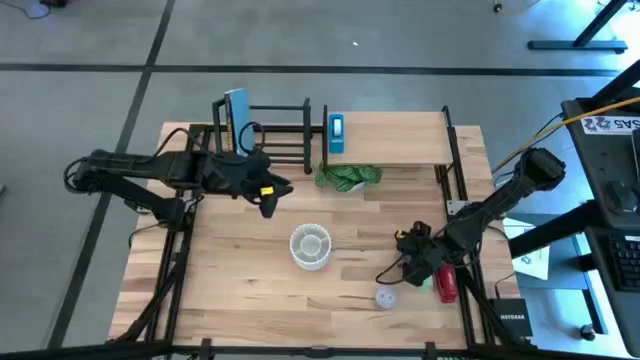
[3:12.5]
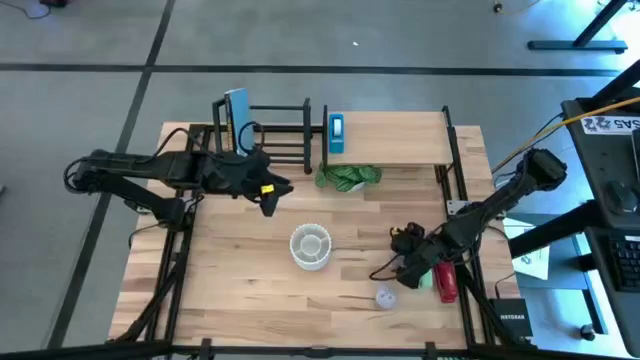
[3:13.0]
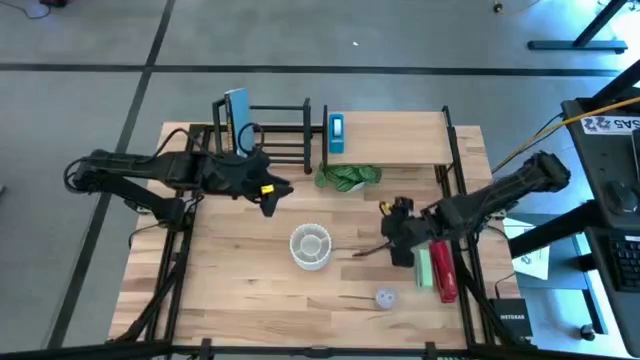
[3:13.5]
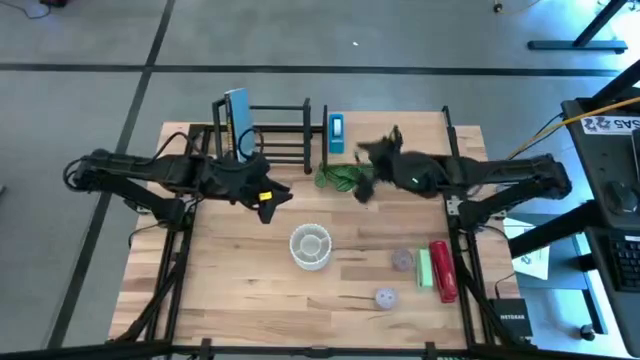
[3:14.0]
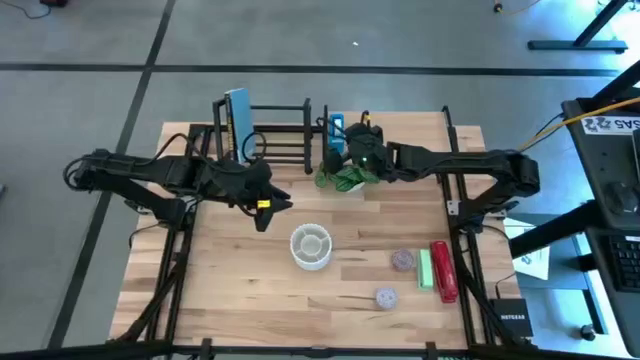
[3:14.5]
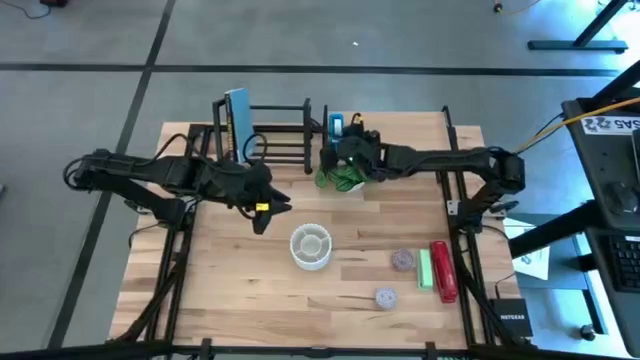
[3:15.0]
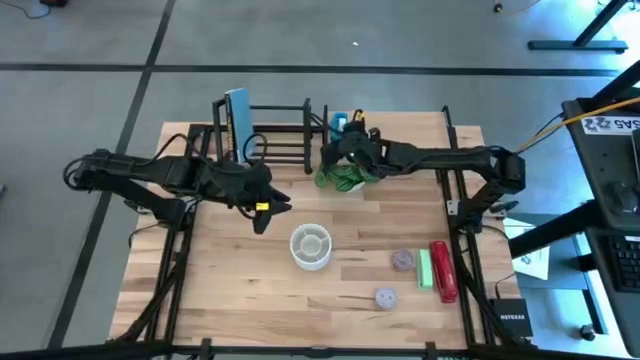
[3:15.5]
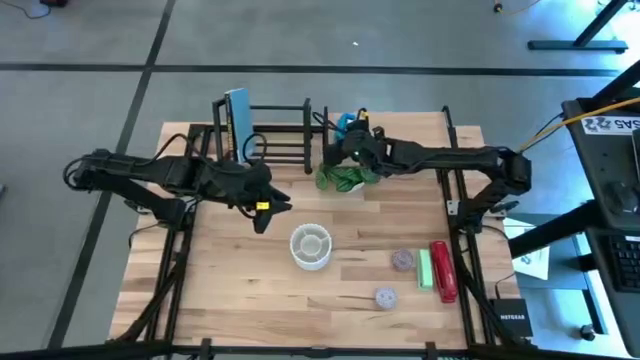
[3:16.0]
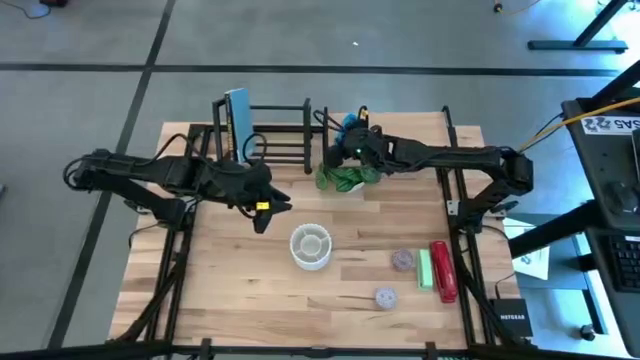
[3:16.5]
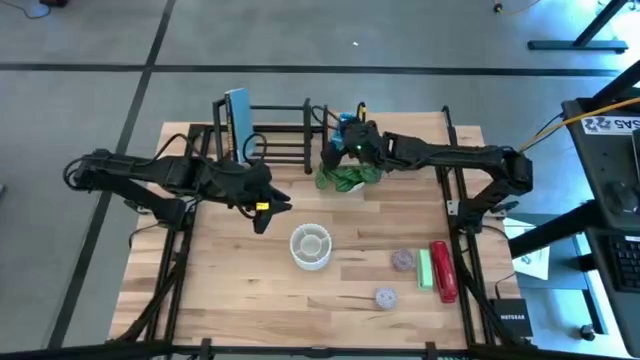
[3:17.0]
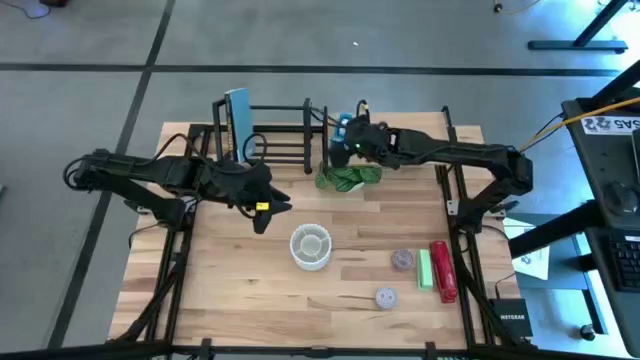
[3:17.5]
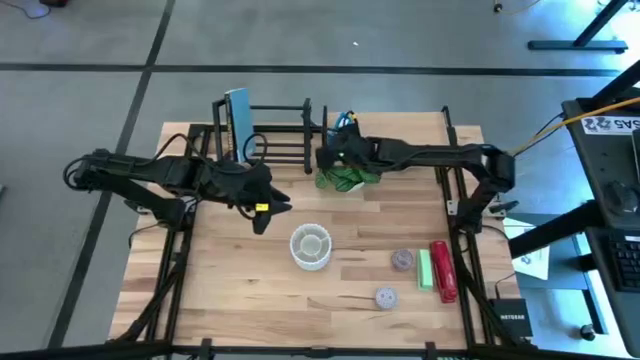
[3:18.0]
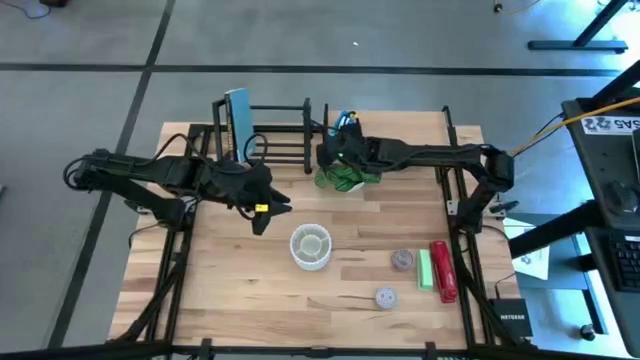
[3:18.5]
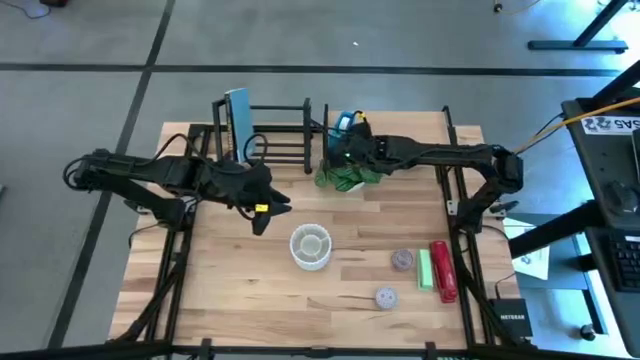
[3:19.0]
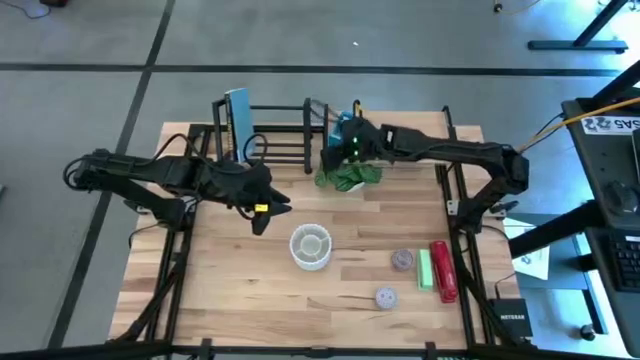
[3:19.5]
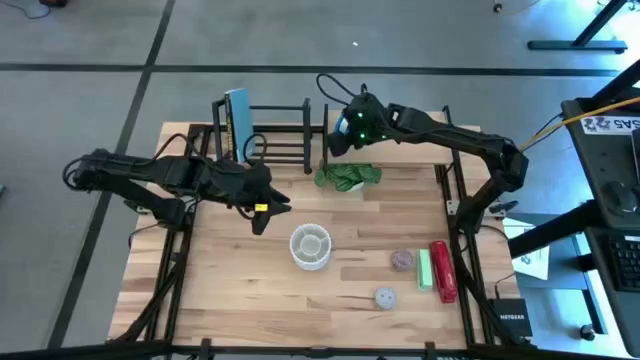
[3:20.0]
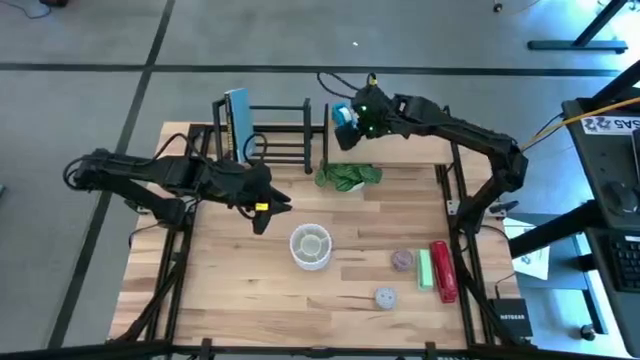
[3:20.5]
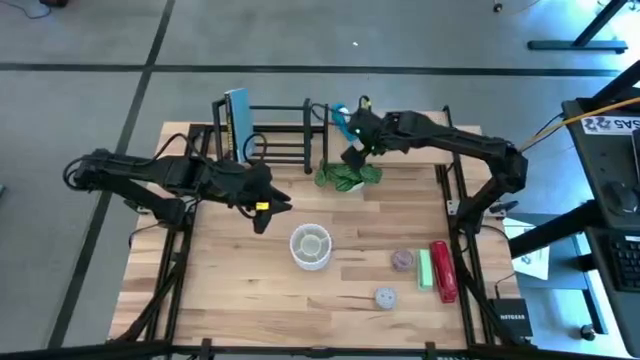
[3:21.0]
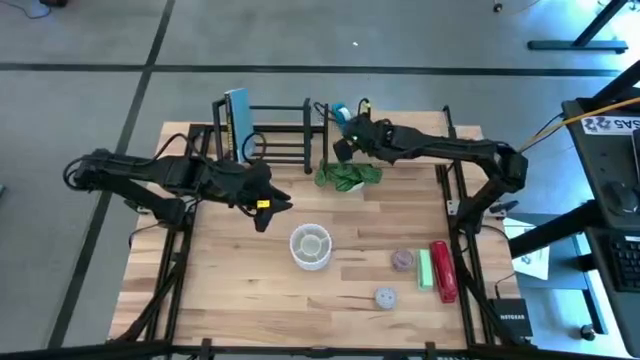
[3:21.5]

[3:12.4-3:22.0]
Task: Stock shelves
Remove the tape dispenser from the shelf

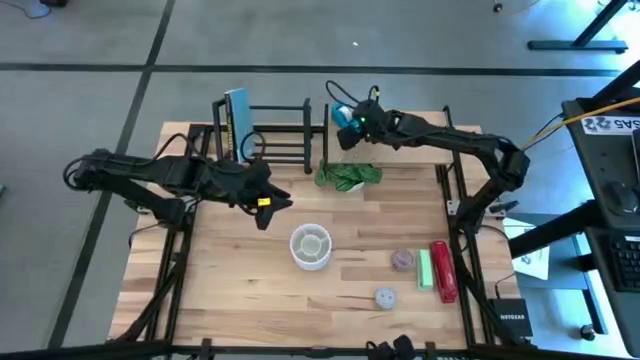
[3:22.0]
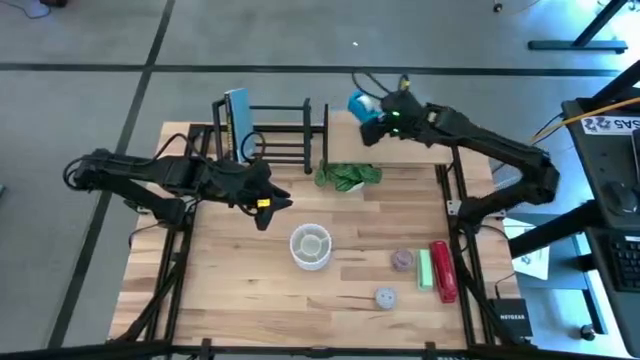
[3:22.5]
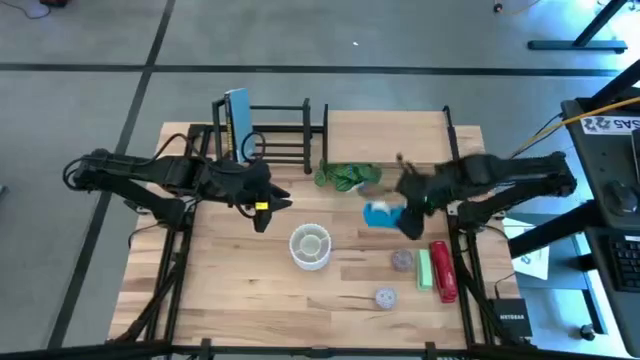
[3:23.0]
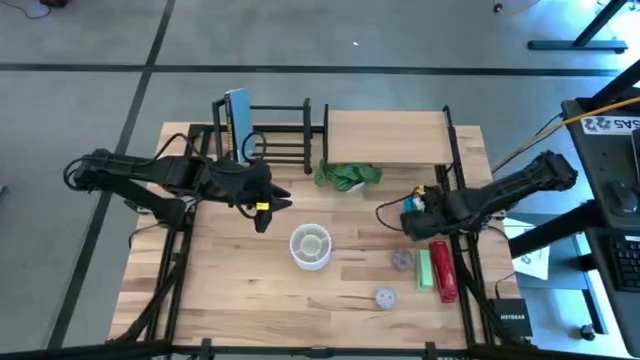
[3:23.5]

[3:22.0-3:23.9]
Remove the tape dispenser from the shelf

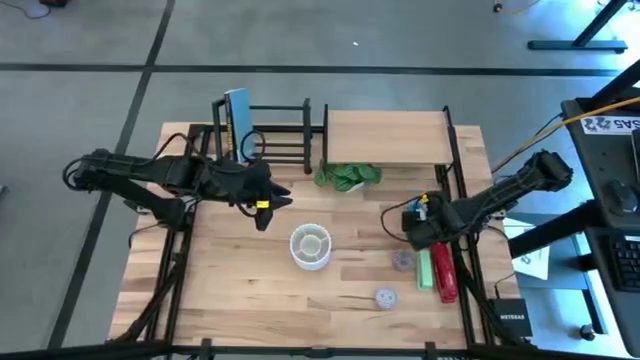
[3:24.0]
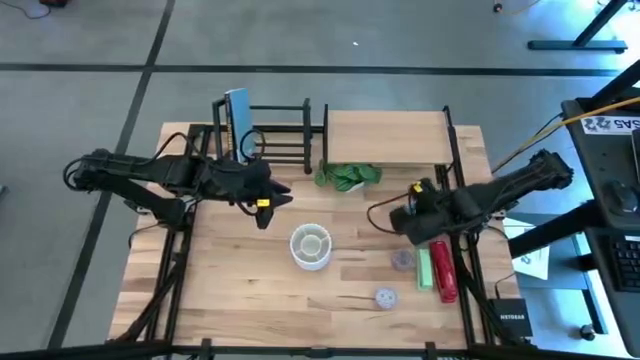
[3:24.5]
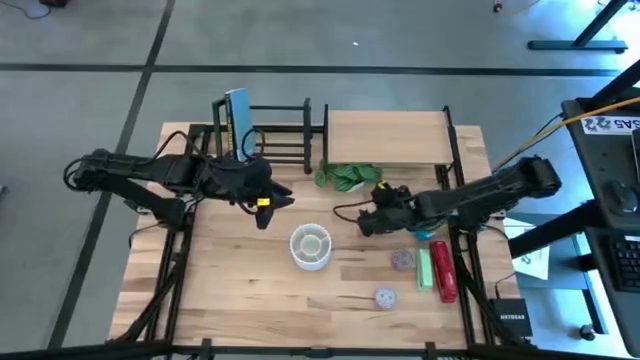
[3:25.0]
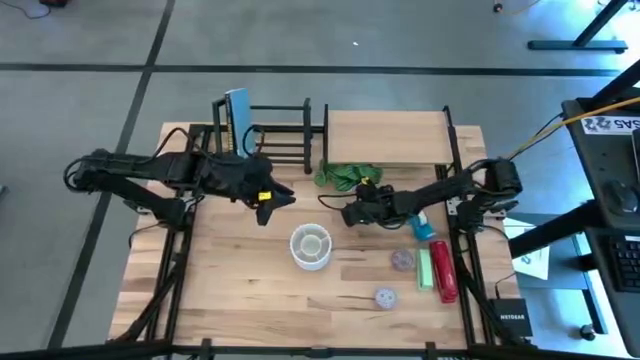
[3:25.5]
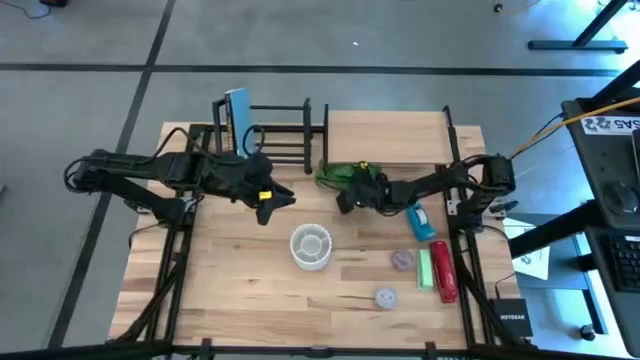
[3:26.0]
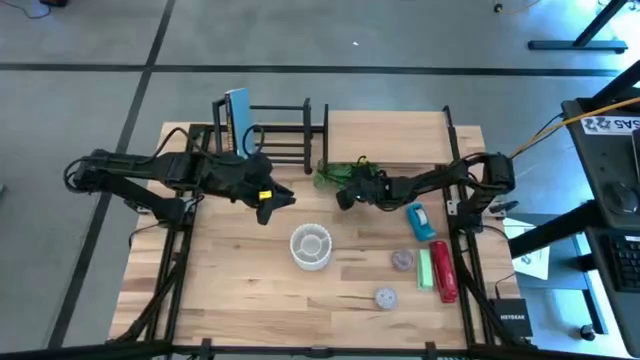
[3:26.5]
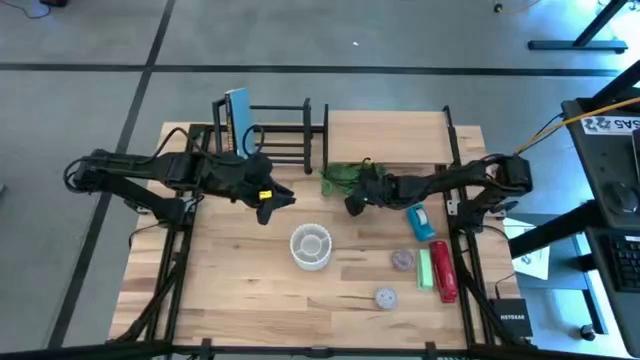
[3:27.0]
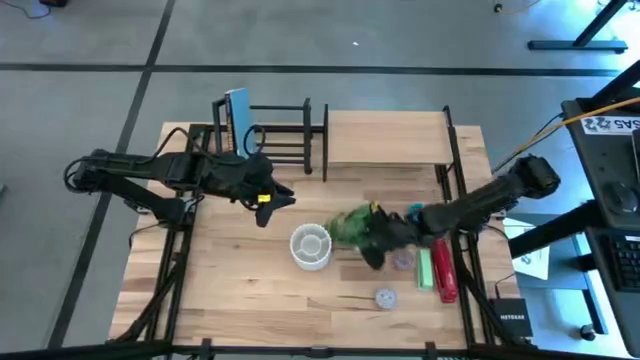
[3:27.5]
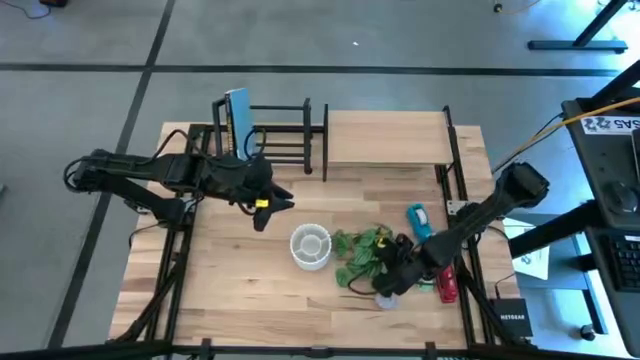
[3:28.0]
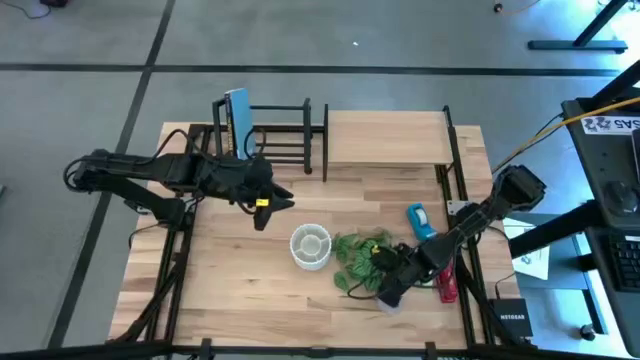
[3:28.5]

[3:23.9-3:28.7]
Remove the white pot from under the shelf

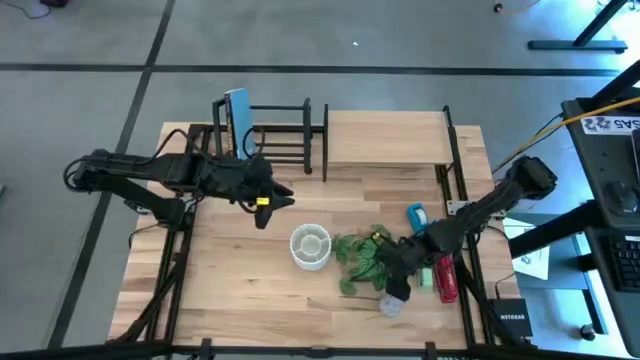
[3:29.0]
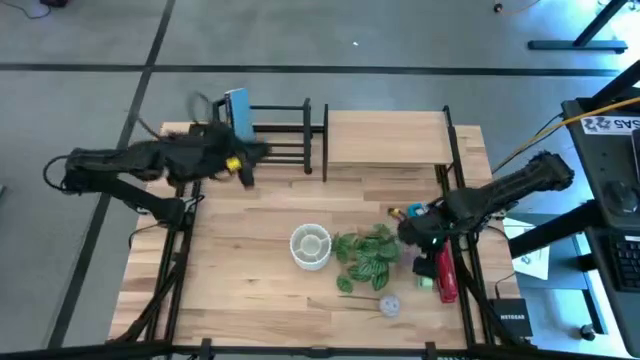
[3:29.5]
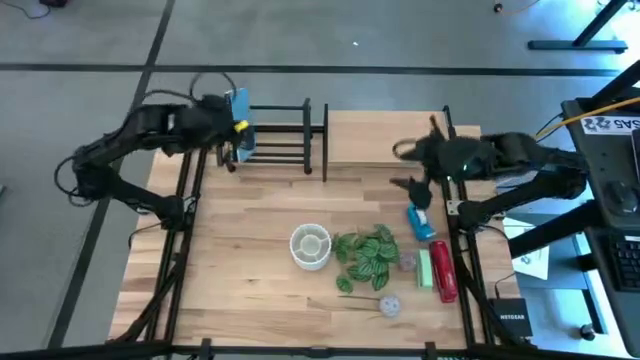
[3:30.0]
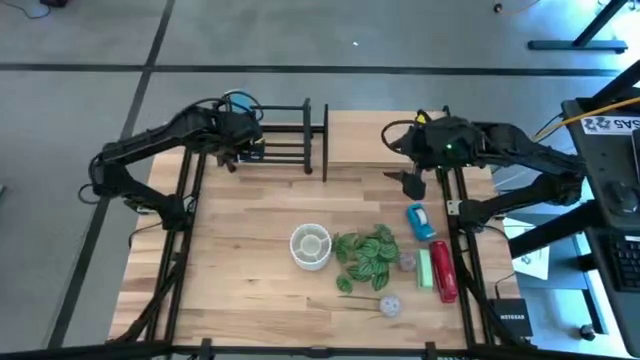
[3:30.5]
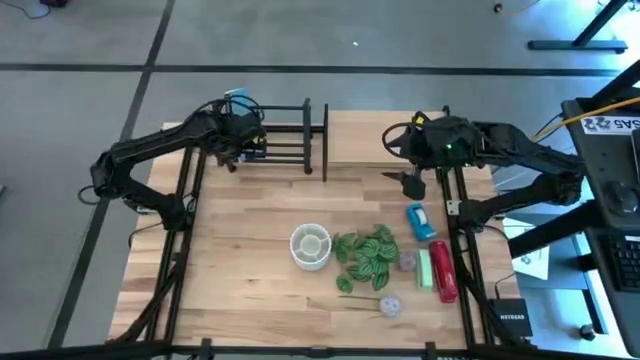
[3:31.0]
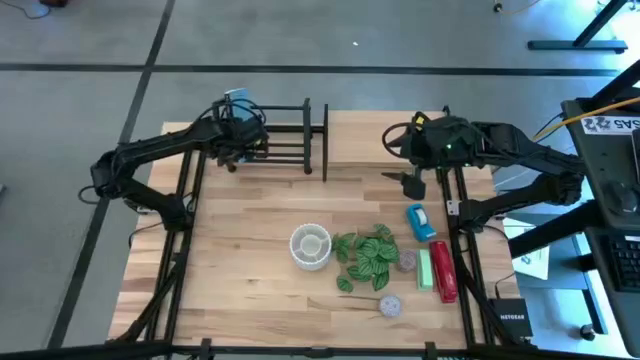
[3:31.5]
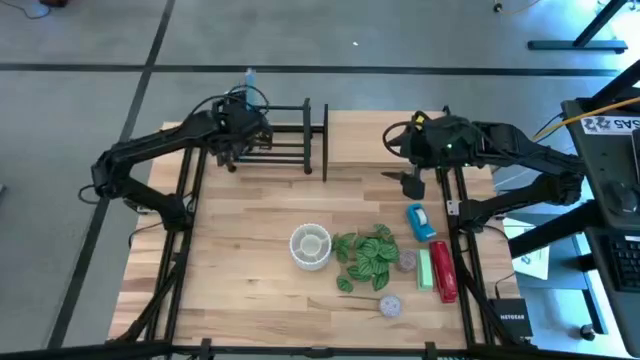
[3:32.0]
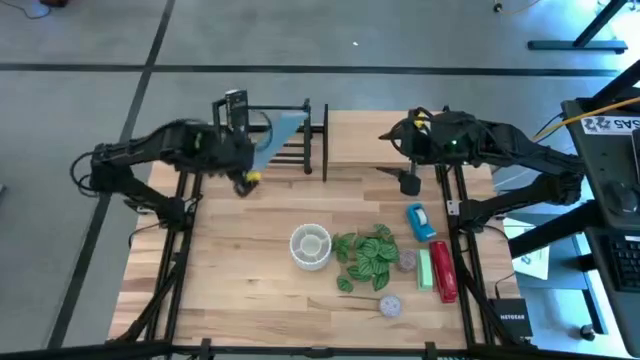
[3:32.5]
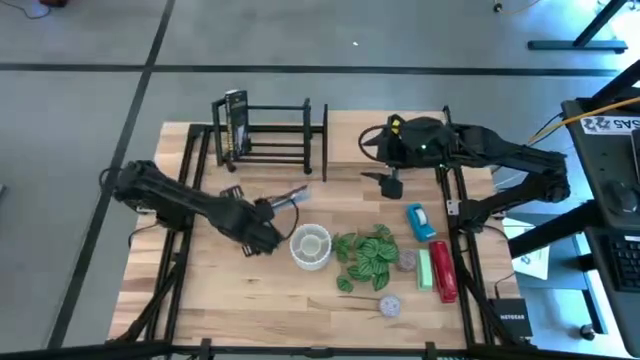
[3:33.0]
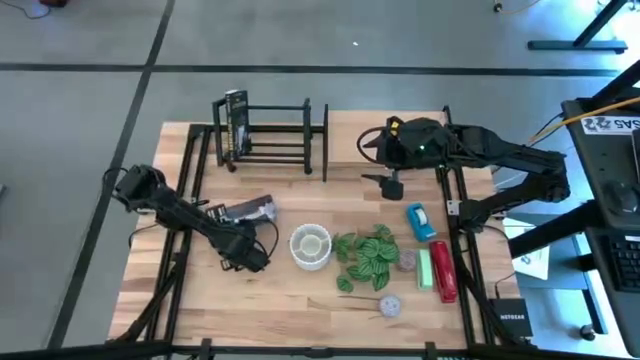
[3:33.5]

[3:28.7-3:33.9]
Remove the blue book from the bookshelf
